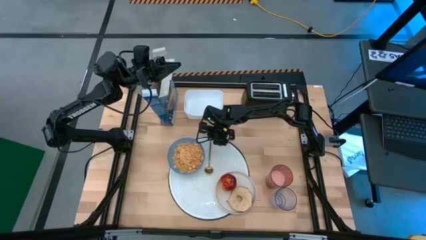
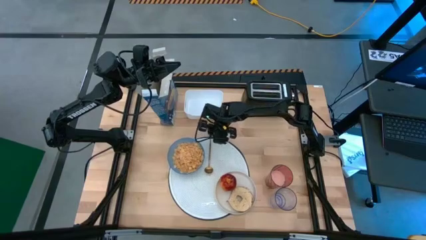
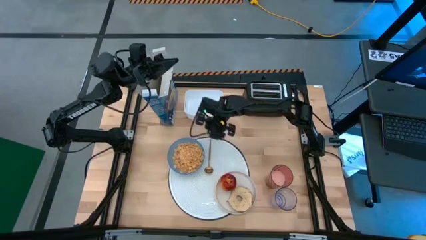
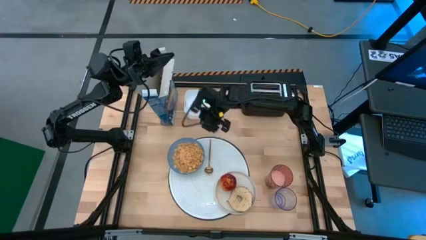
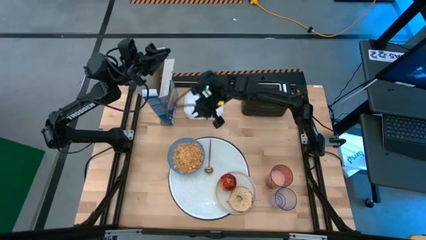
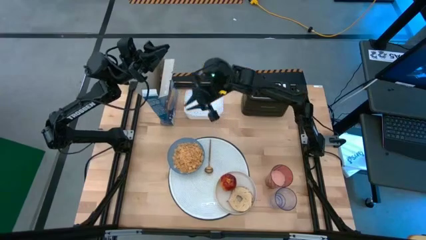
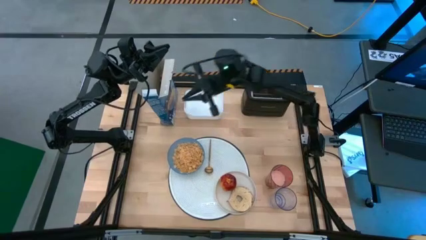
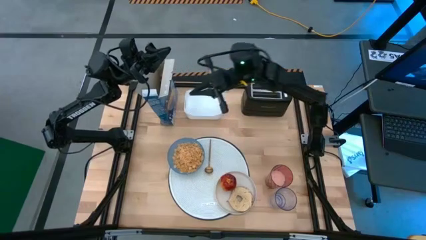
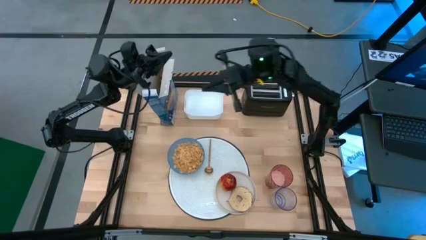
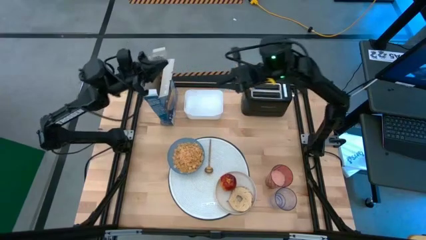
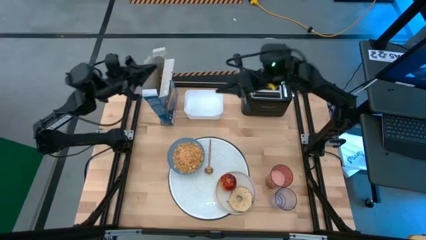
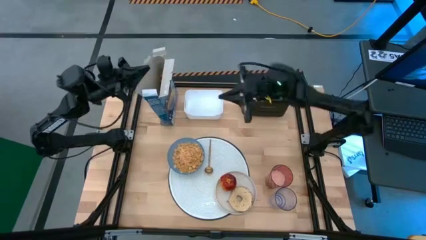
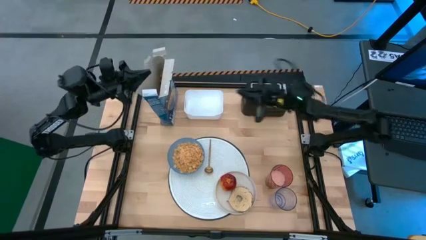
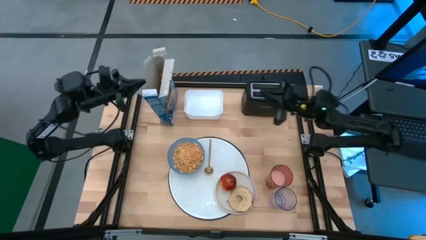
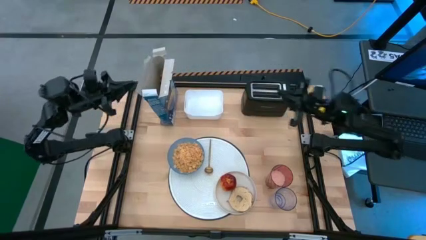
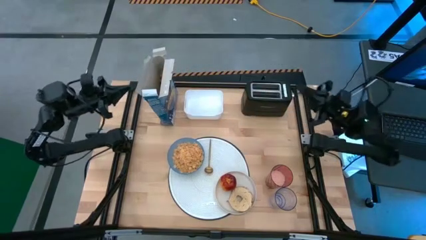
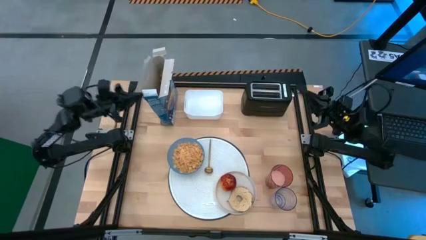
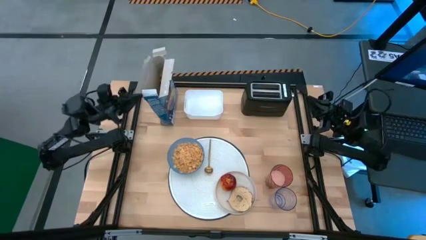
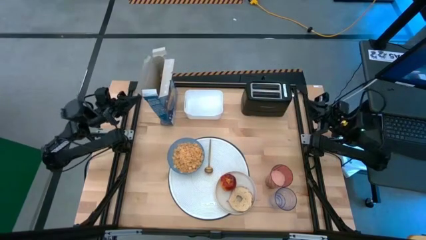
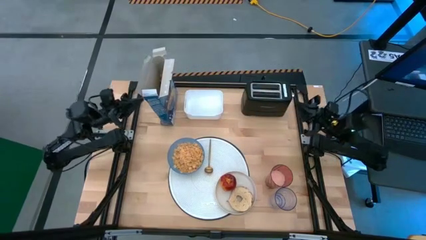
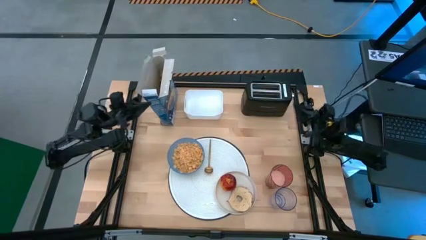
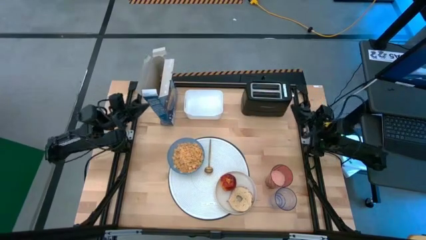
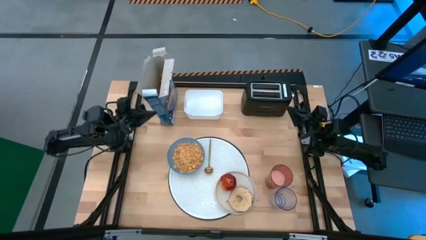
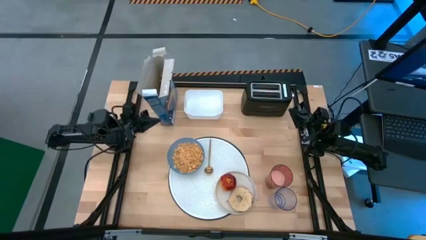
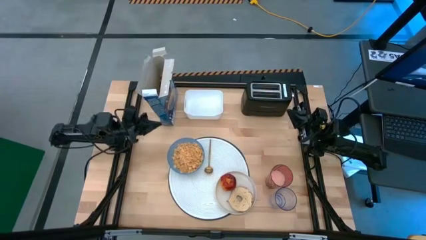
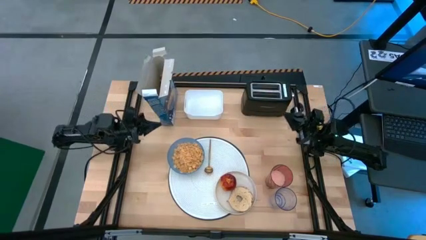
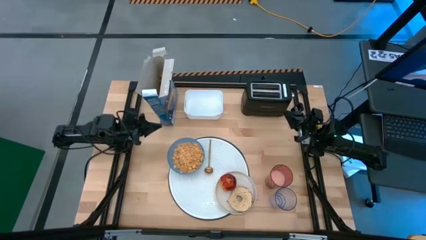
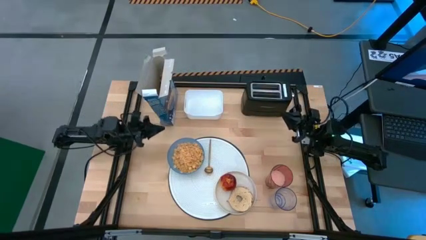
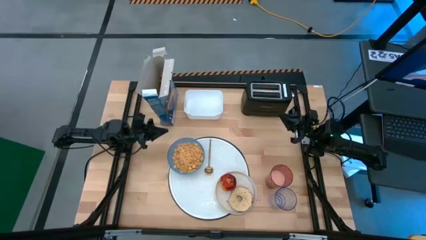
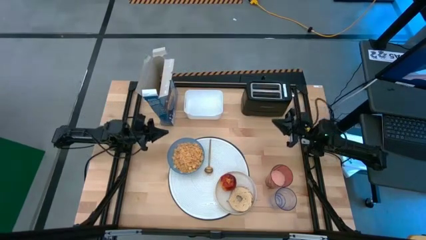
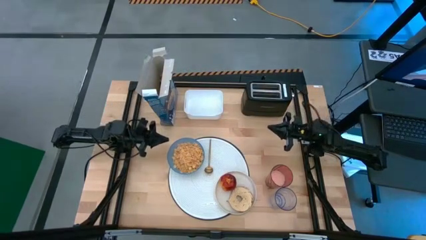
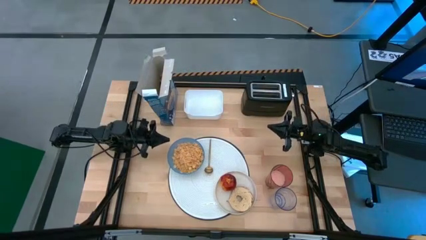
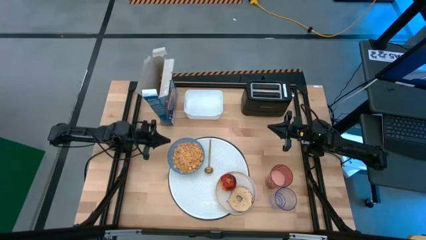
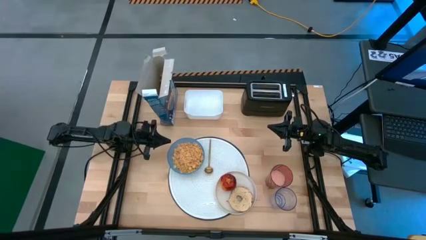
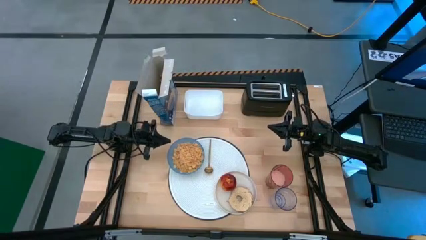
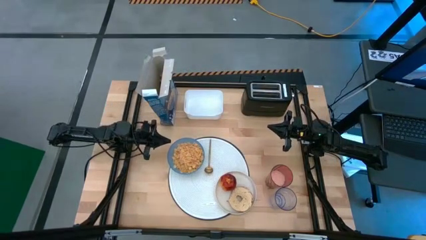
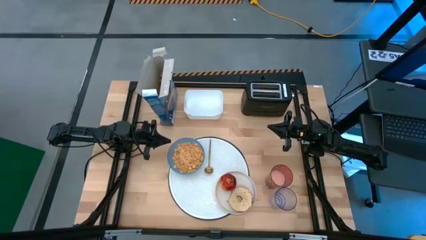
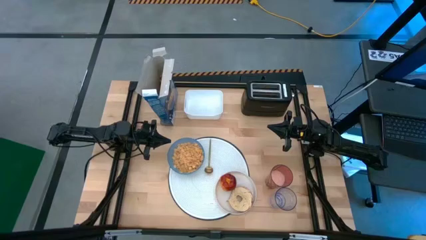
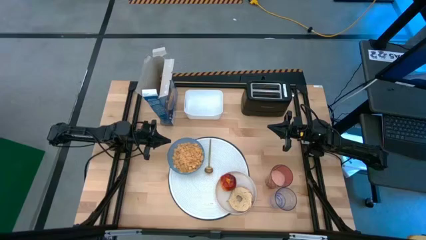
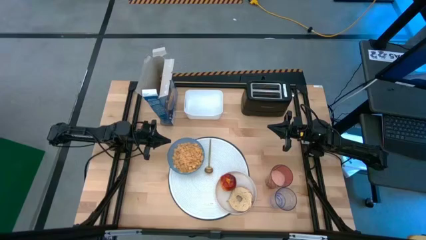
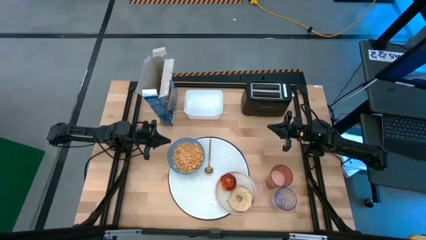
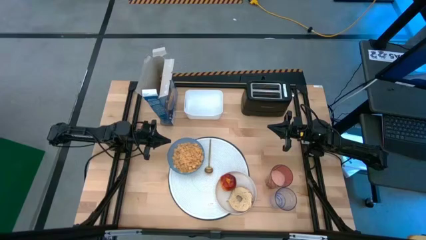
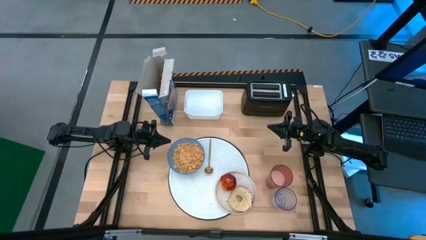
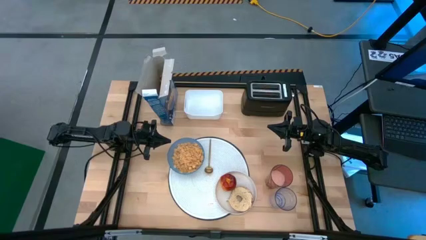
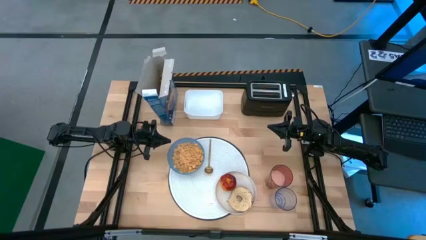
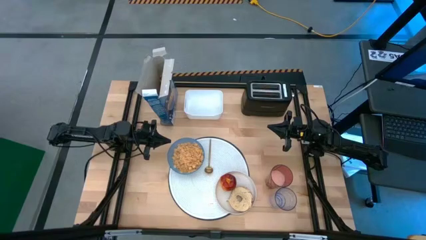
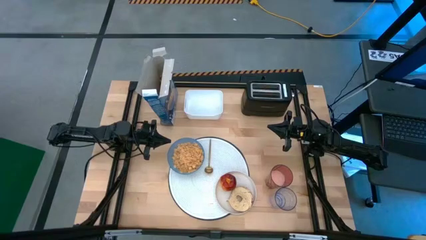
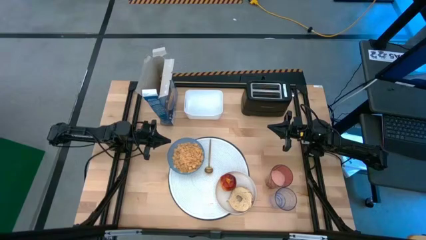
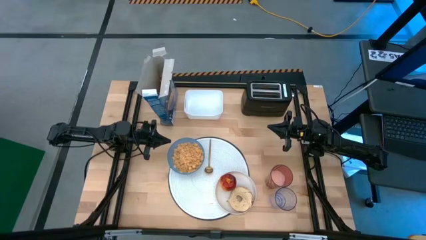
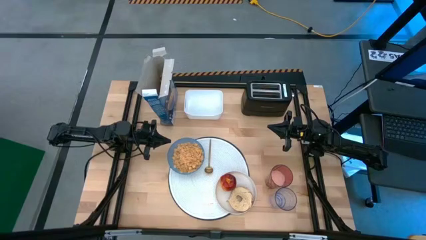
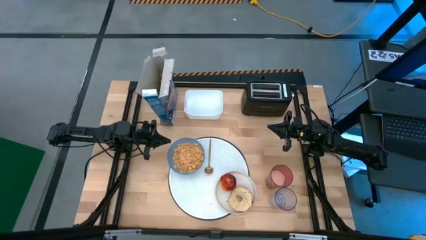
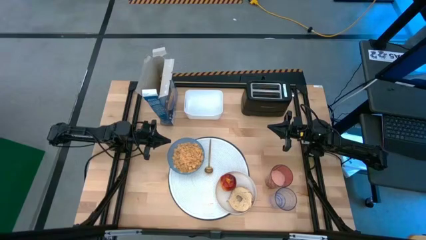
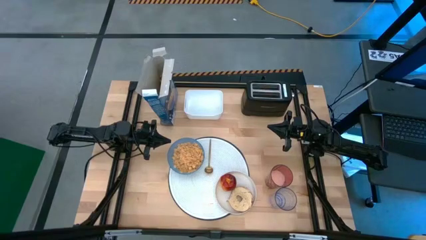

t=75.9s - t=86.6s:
Task: Arrange a breakfast setting
Return to Home Position
